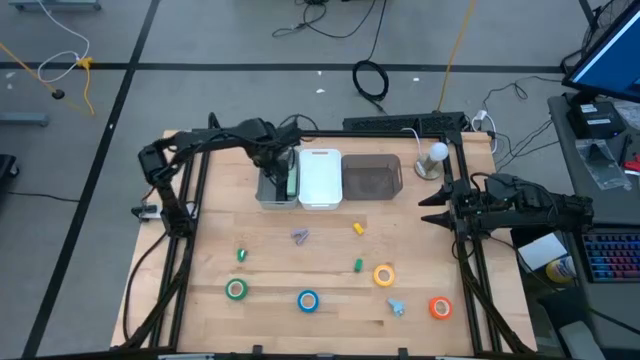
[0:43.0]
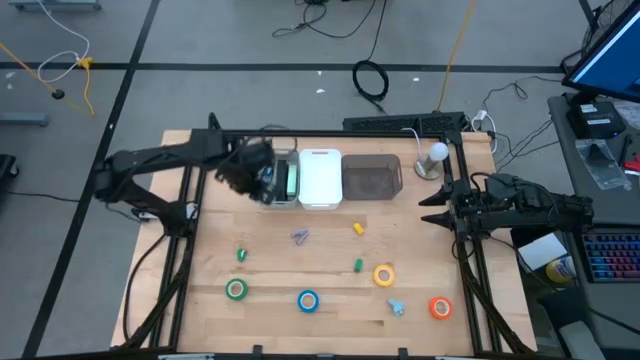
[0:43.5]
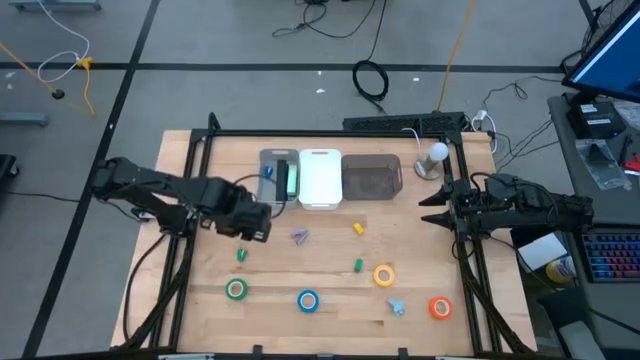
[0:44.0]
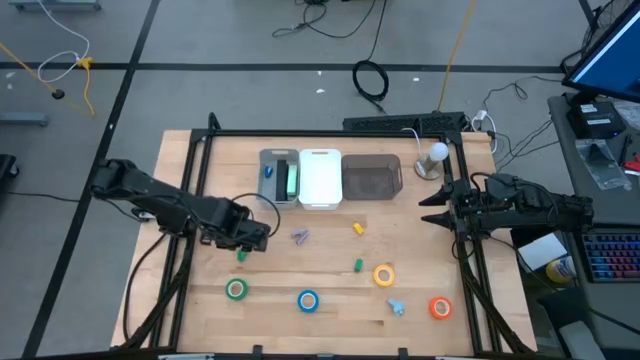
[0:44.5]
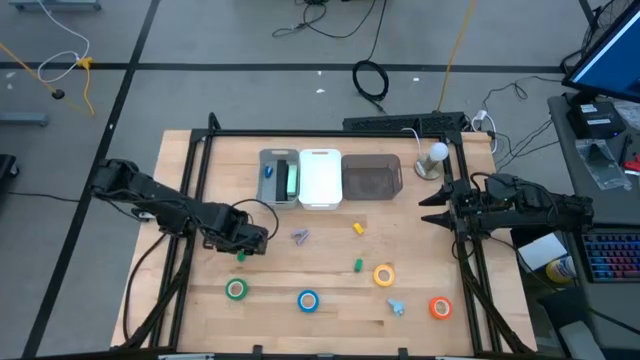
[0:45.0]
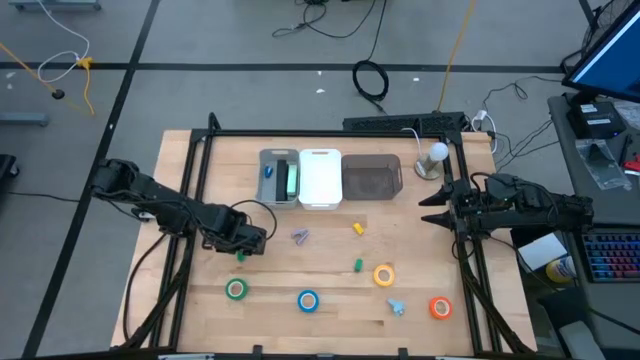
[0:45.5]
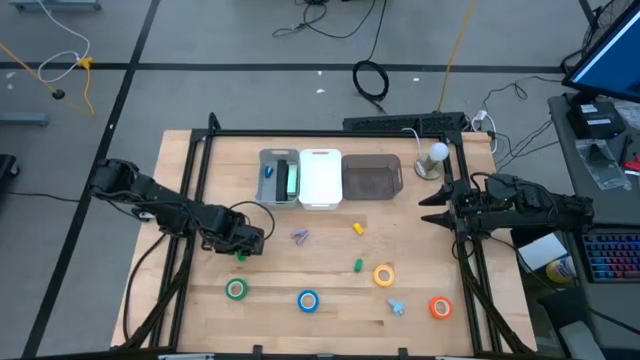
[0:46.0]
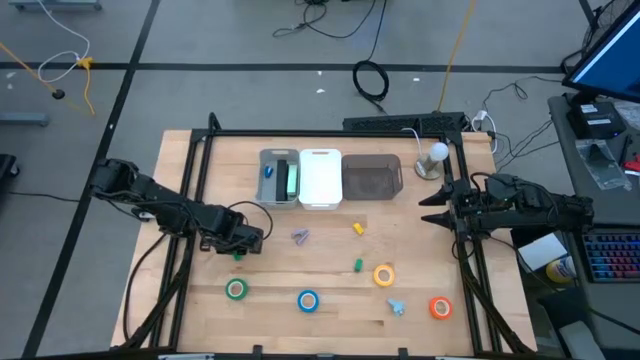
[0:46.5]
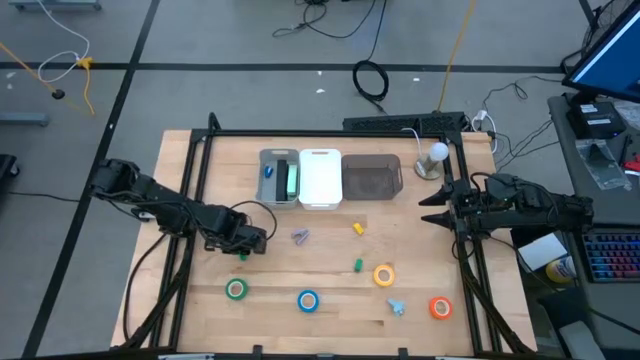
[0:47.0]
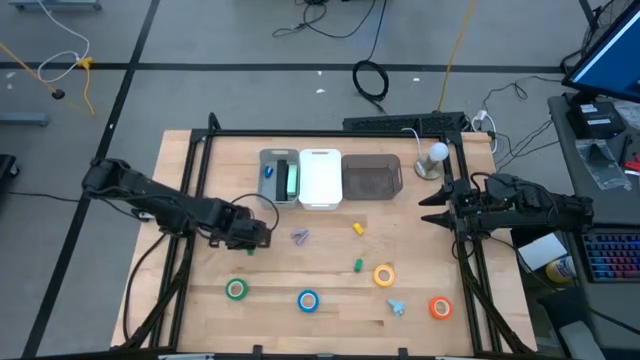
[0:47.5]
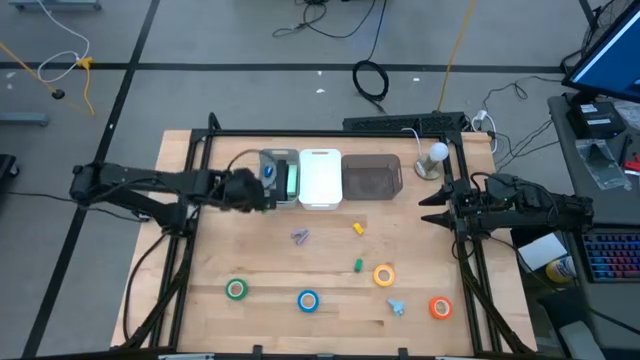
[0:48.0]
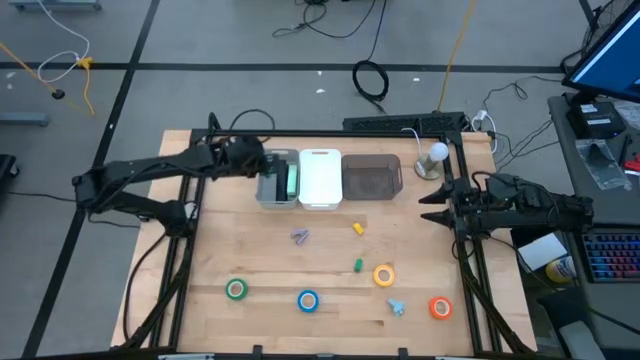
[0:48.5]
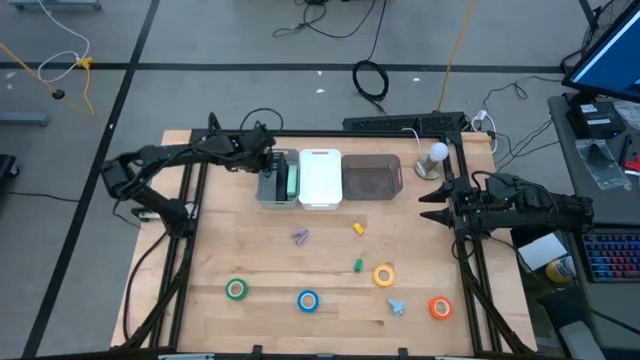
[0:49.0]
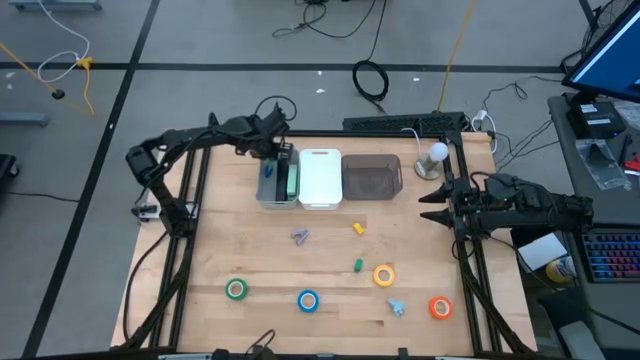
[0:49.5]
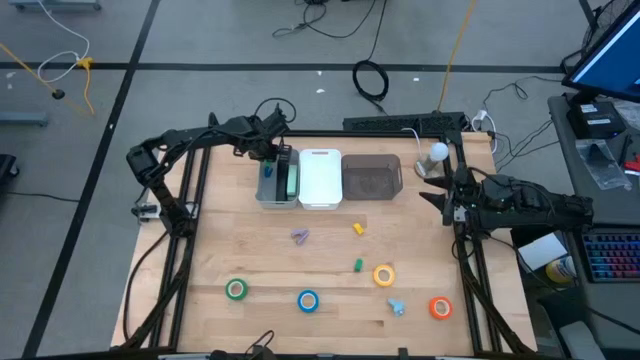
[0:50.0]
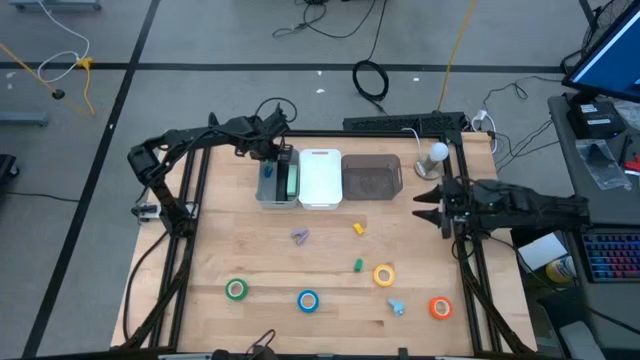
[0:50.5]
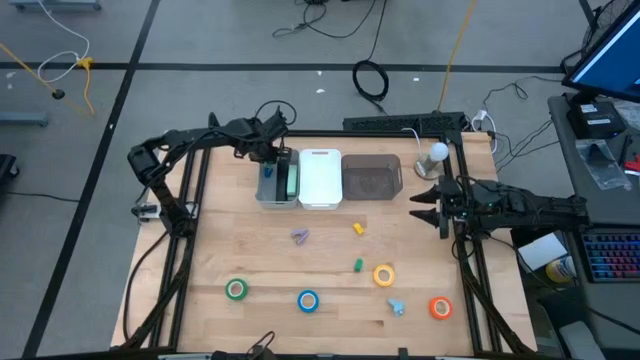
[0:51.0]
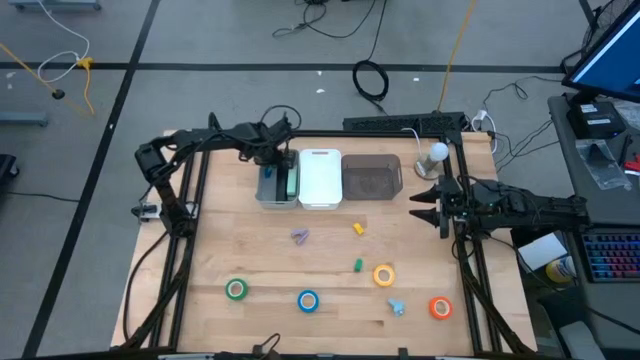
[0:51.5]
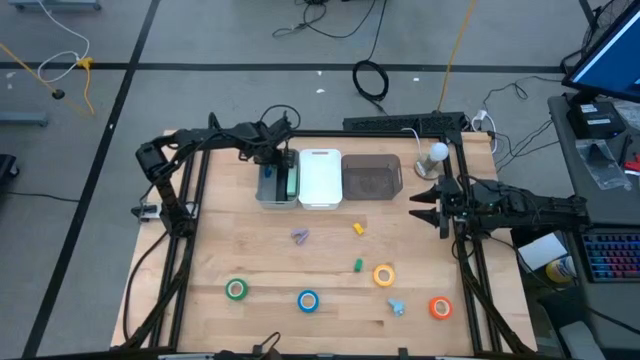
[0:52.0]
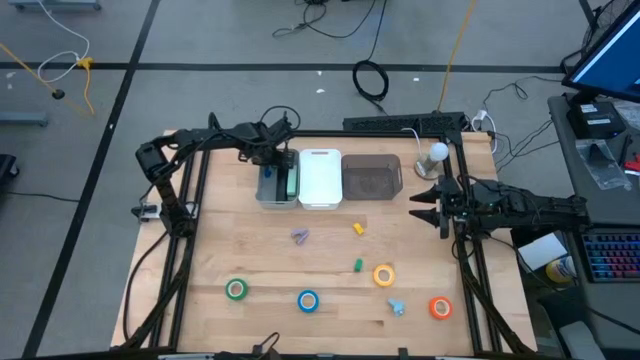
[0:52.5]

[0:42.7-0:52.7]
Task: Pick and place Stapler, Stapler remover, tape
Put the left green stapler into the gray bin

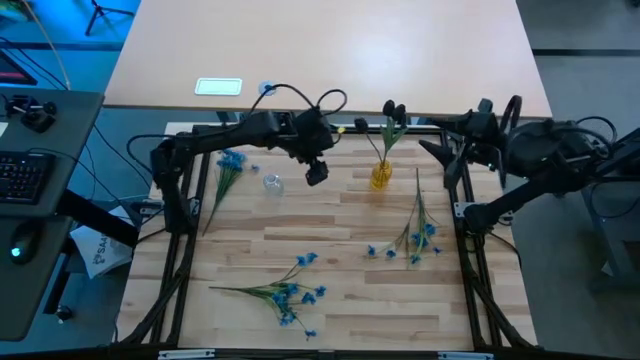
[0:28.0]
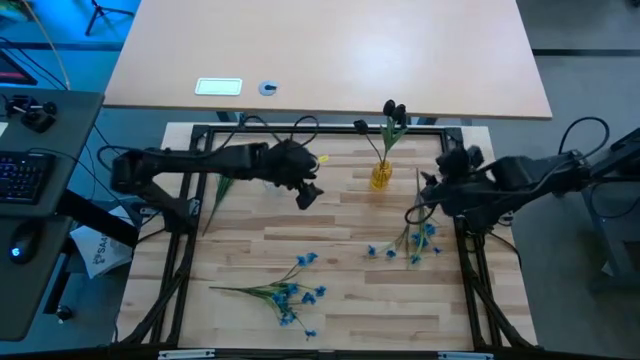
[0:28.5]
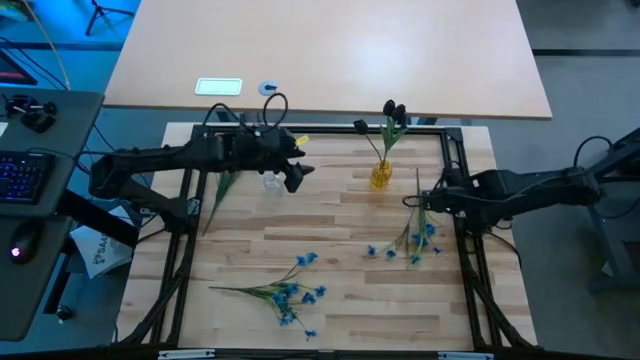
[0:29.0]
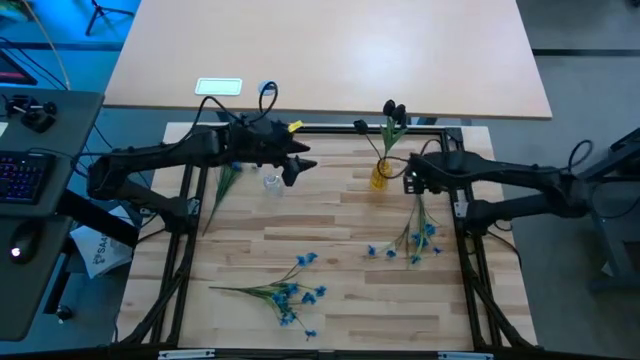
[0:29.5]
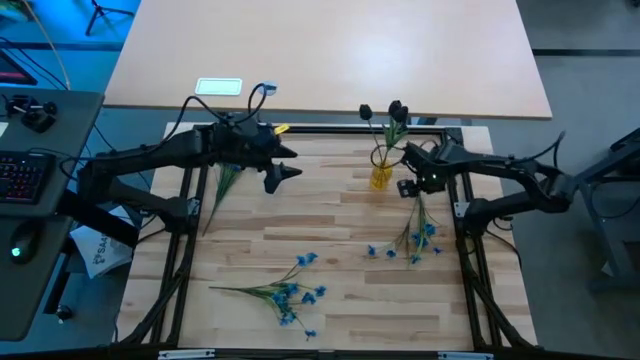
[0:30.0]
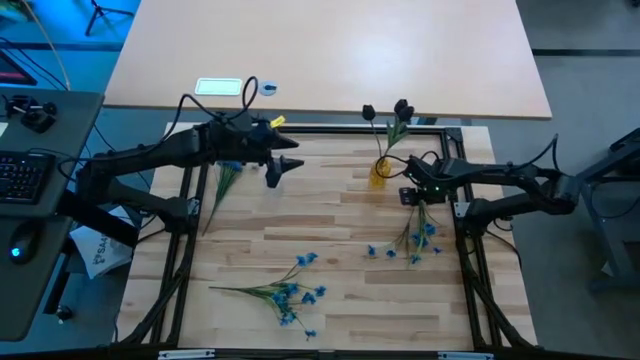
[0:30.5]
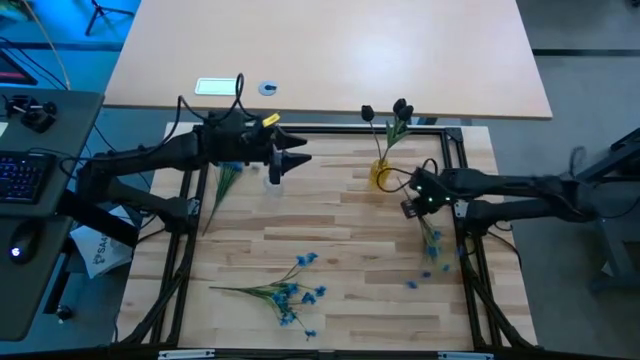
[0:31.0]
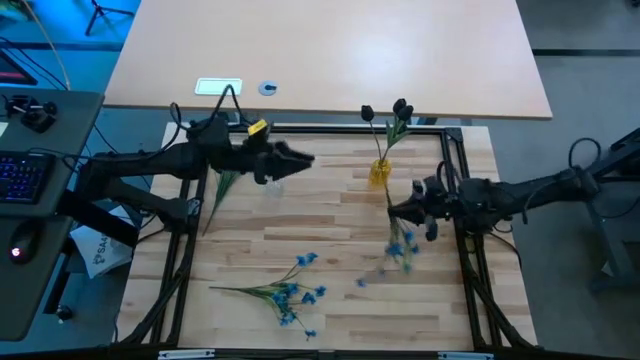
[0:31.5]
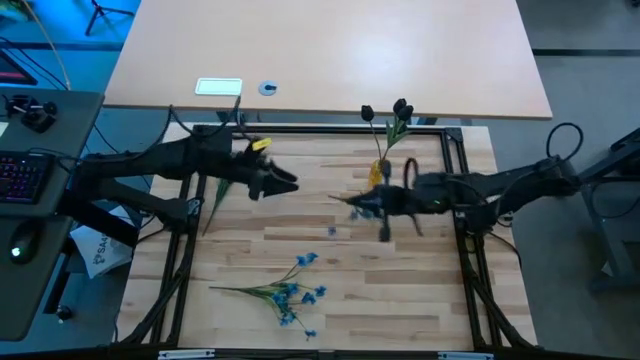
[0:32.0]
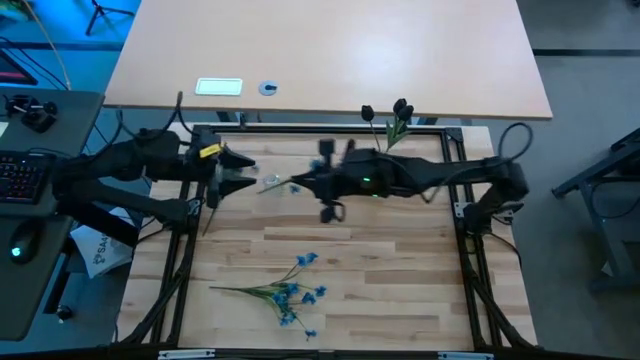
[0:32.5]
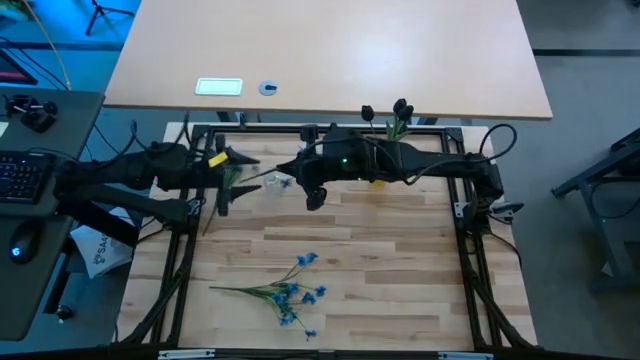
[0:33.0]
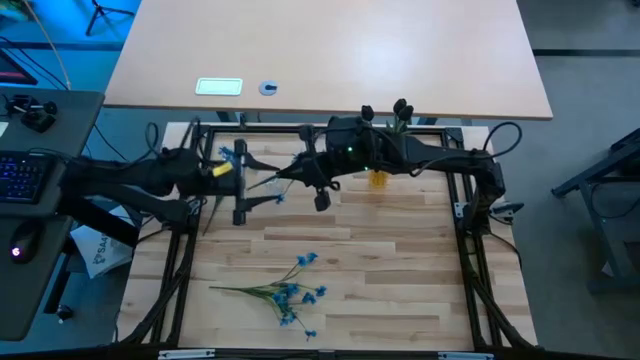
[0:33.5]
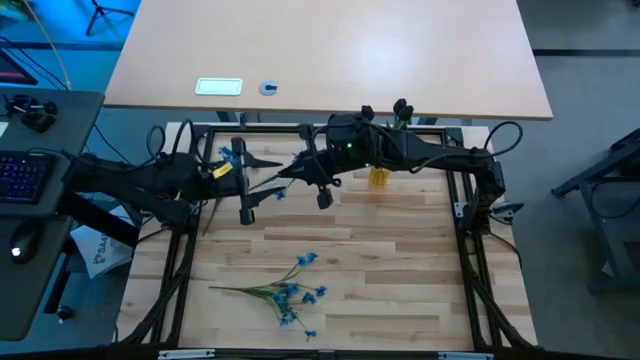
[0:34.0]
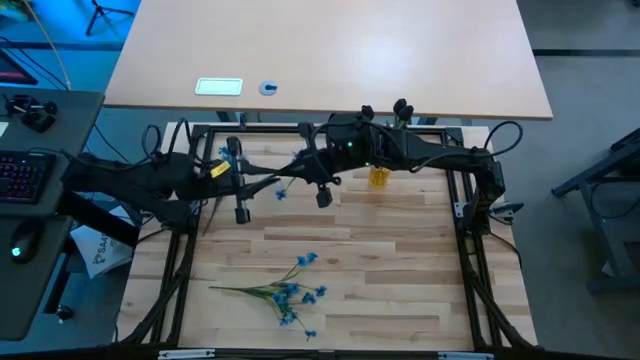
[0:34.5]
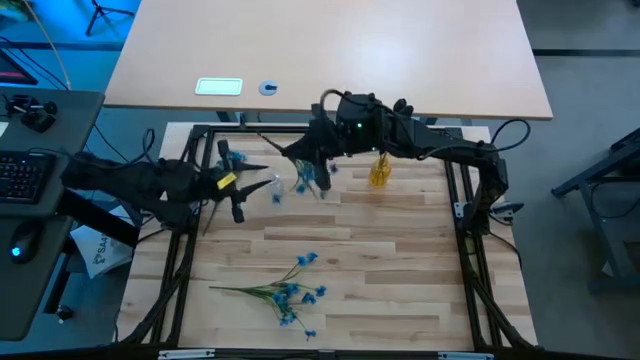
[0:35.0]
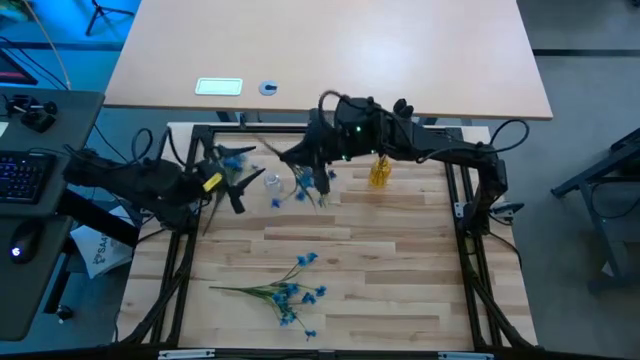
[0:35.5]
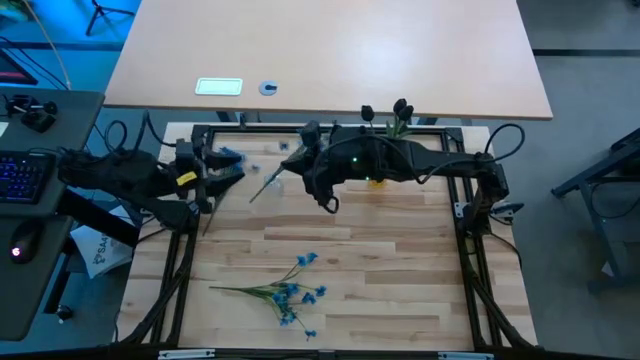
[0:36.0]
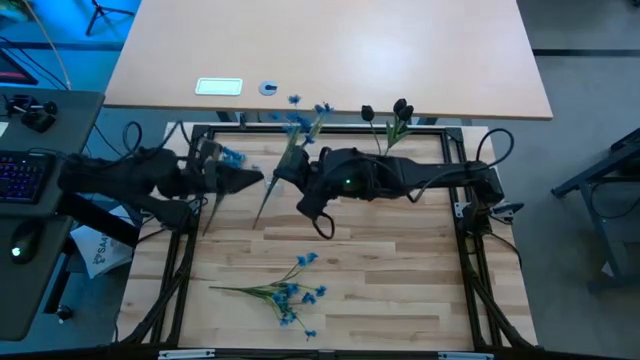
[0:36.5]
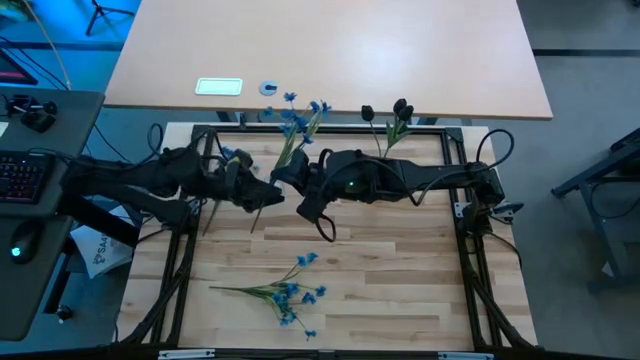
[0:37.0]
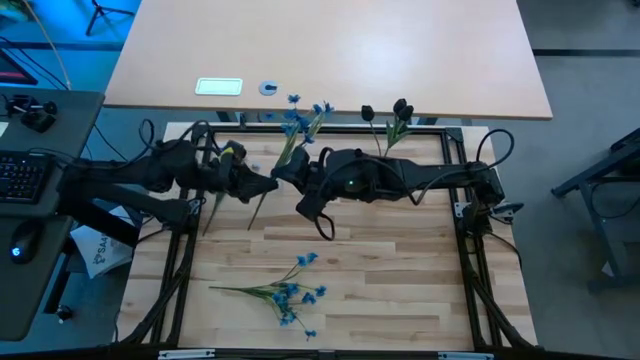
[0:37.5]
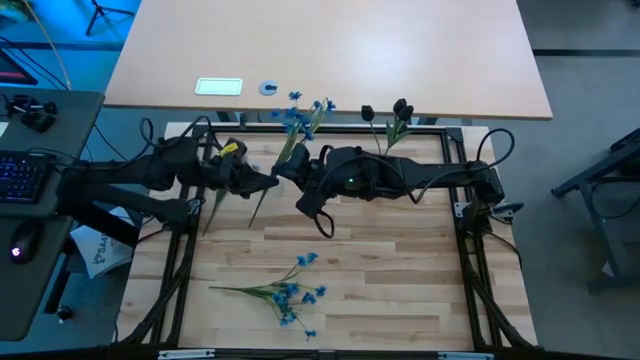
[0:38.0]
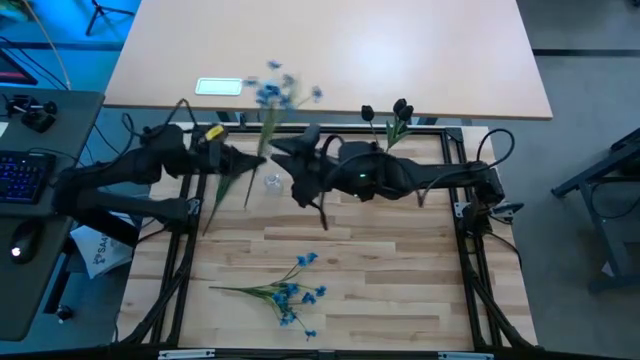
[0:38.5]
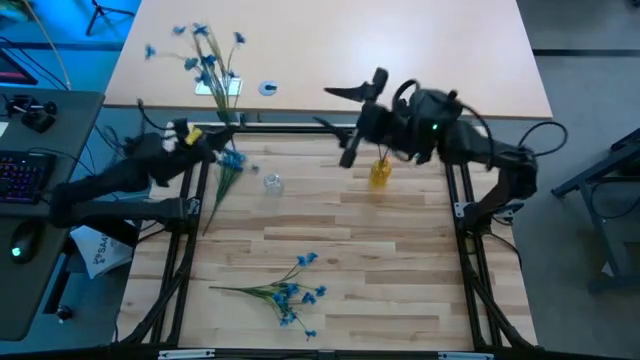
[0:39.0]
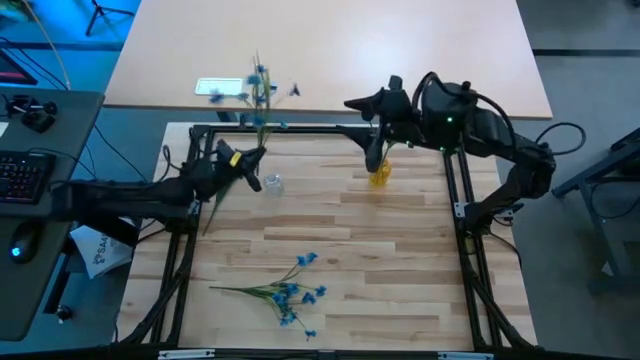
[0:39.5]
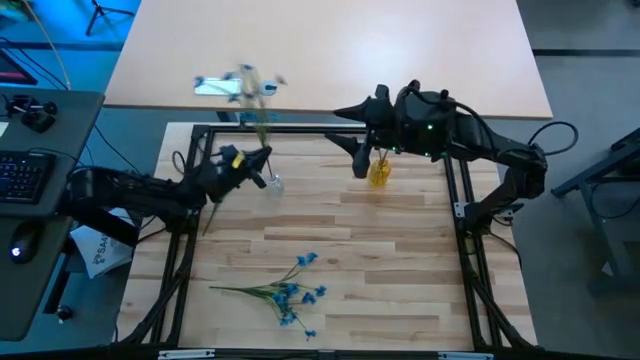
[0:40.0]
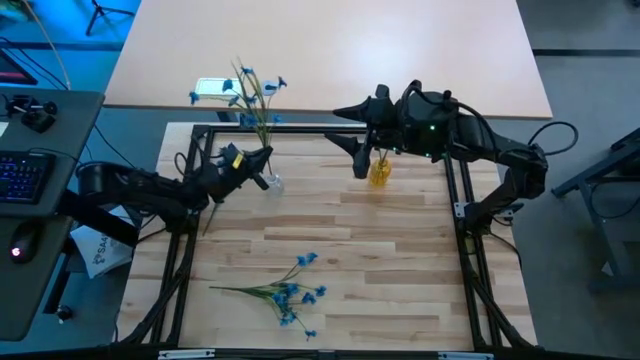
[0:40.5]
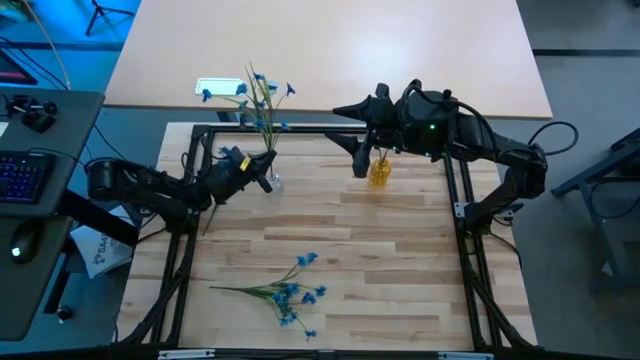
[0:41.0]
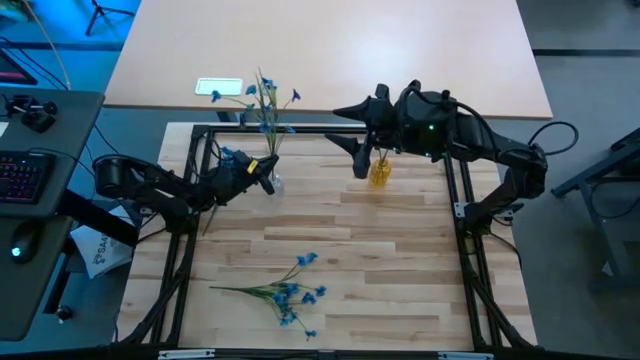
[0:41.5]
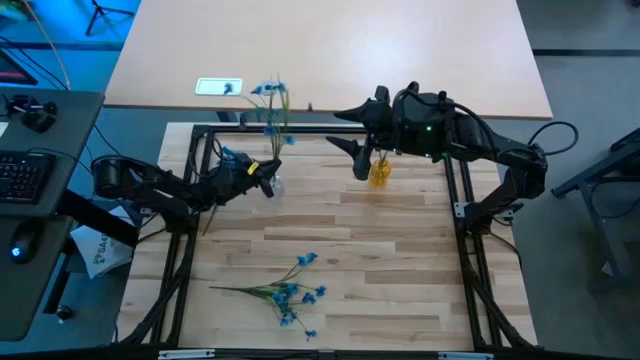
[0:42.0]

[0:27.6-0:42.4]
Task: Sort flowers into vase by color
Put the right blue flowers into the transparent crystal vase
